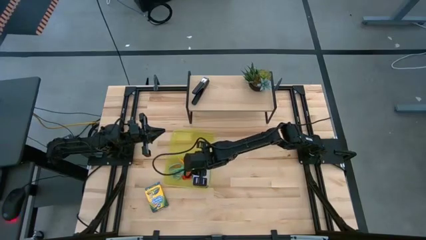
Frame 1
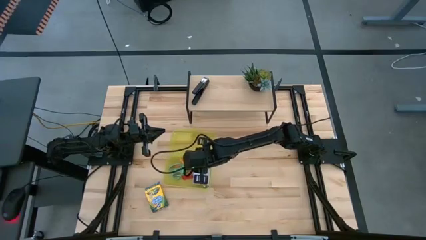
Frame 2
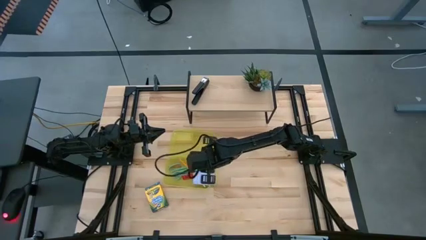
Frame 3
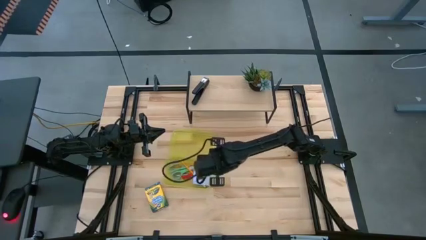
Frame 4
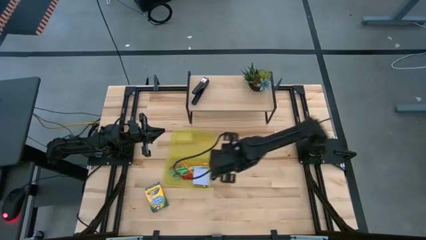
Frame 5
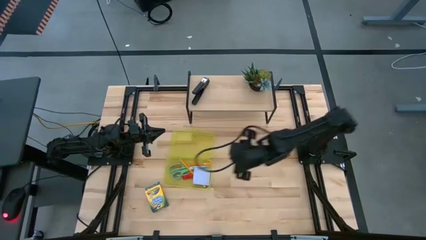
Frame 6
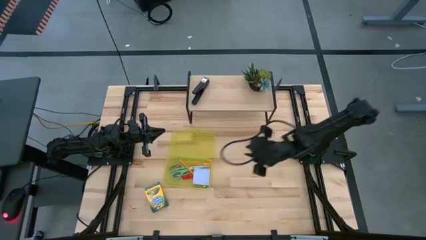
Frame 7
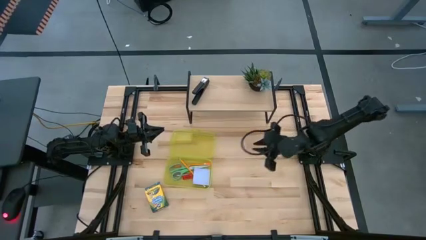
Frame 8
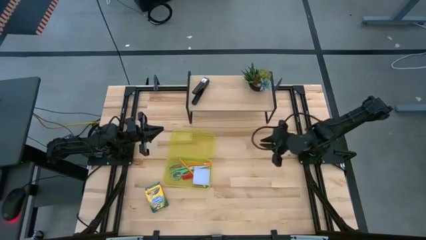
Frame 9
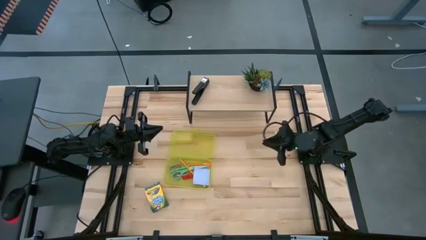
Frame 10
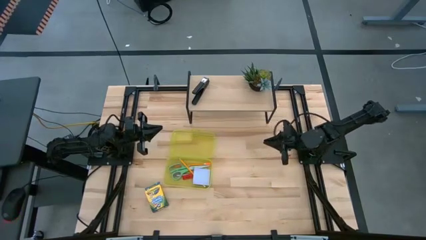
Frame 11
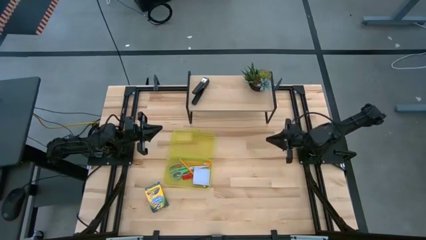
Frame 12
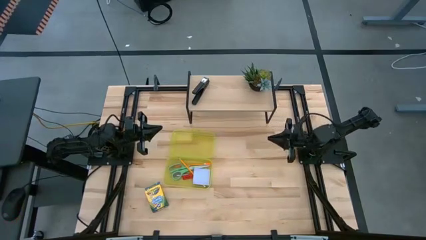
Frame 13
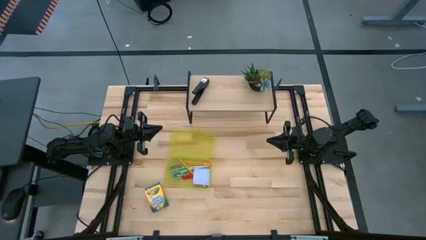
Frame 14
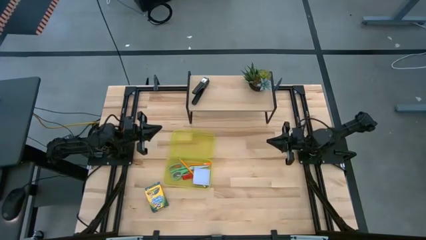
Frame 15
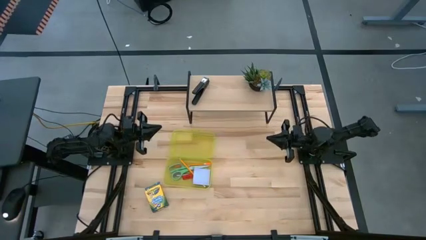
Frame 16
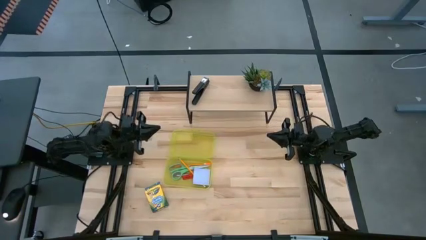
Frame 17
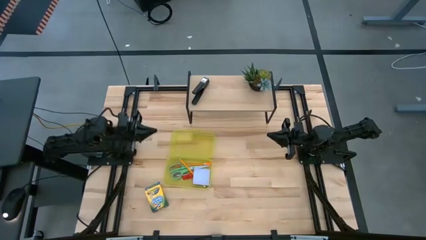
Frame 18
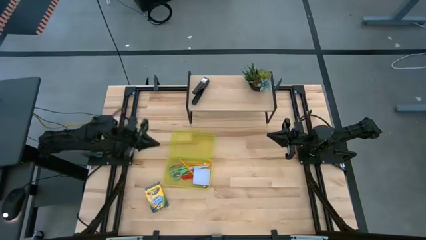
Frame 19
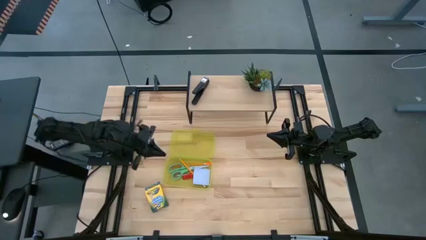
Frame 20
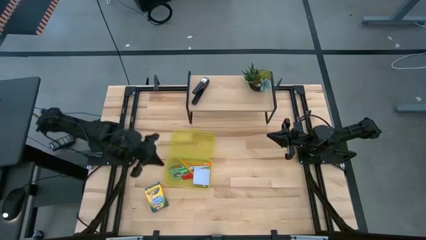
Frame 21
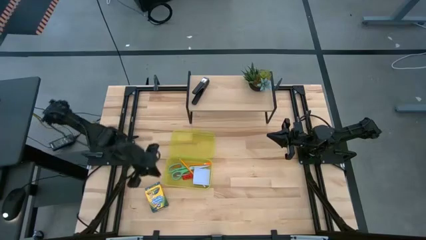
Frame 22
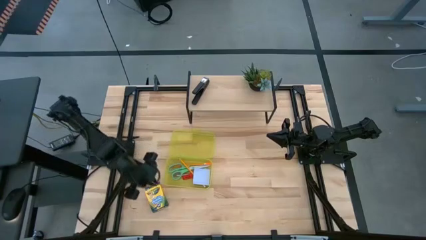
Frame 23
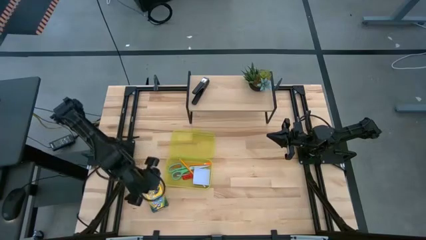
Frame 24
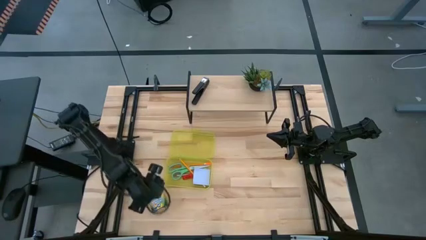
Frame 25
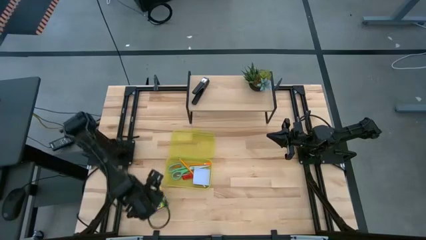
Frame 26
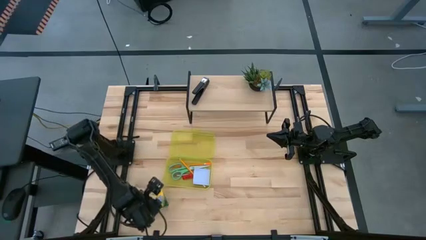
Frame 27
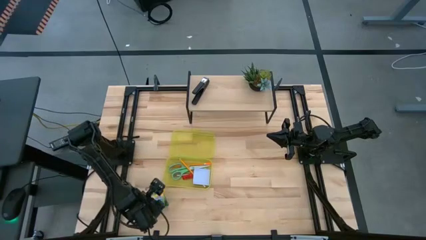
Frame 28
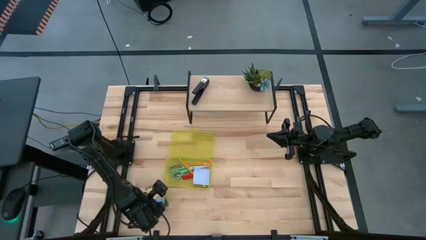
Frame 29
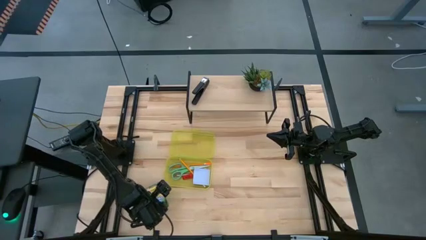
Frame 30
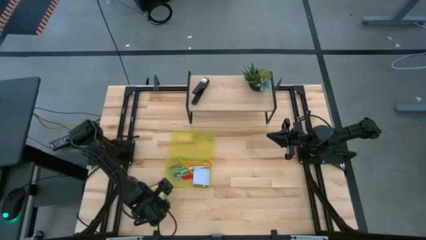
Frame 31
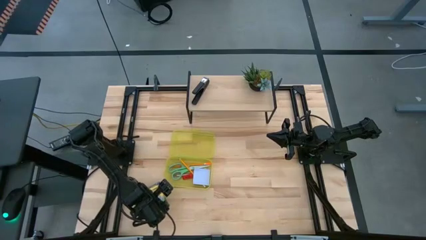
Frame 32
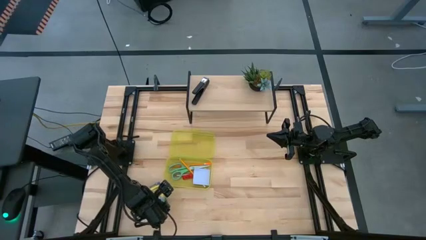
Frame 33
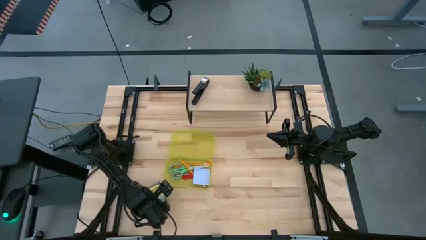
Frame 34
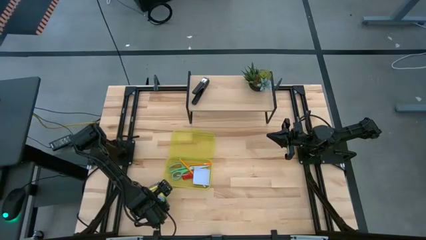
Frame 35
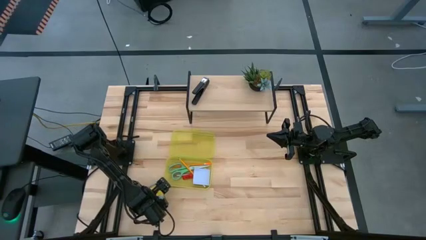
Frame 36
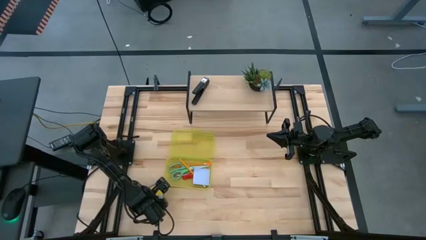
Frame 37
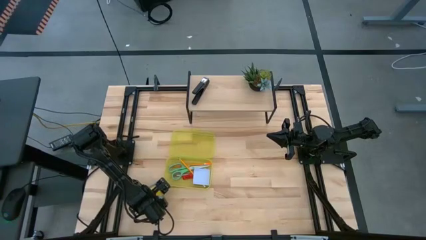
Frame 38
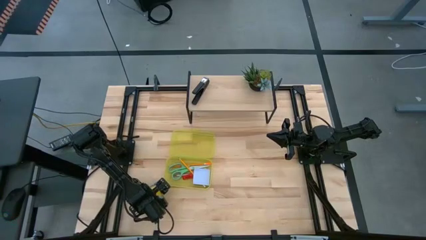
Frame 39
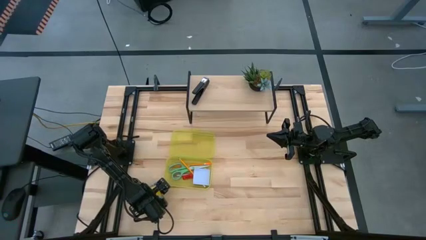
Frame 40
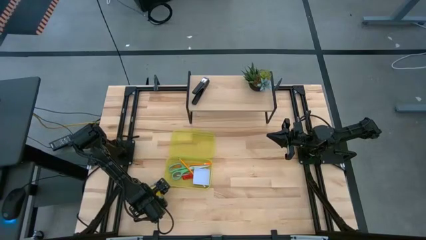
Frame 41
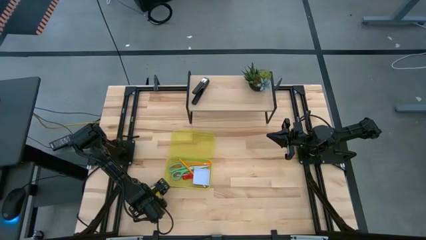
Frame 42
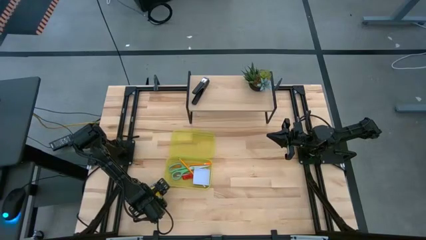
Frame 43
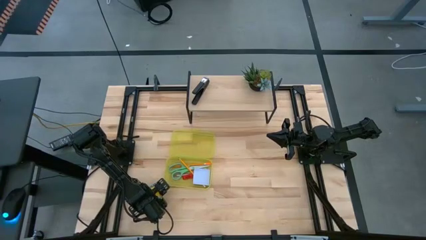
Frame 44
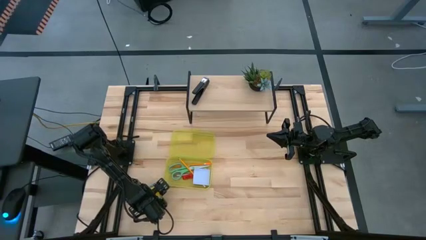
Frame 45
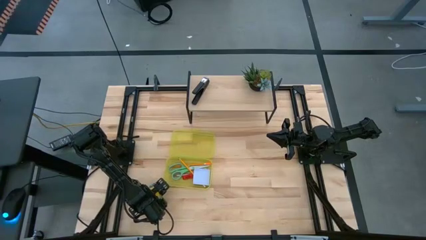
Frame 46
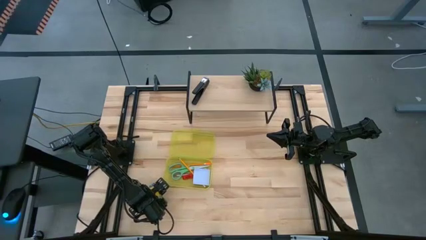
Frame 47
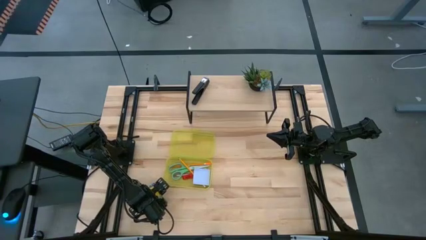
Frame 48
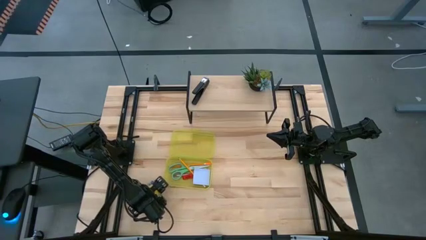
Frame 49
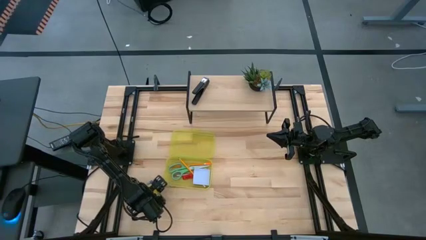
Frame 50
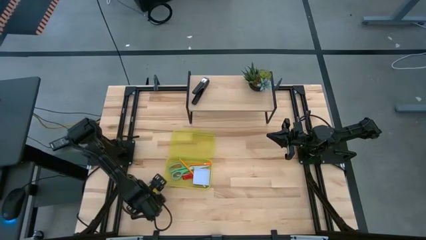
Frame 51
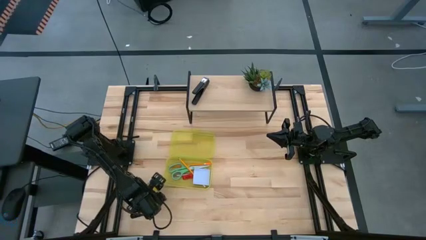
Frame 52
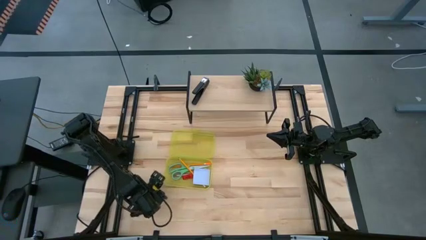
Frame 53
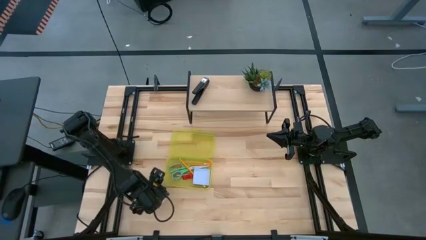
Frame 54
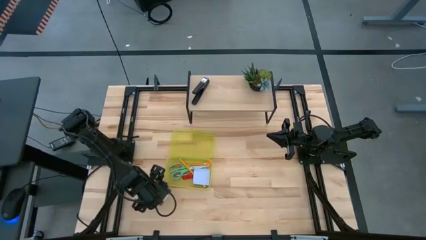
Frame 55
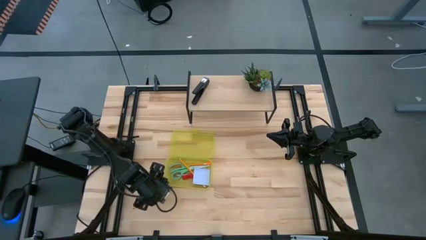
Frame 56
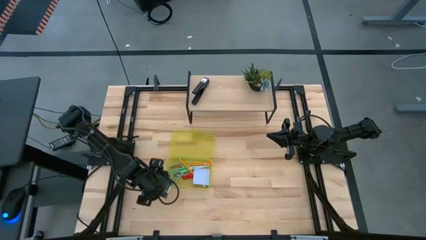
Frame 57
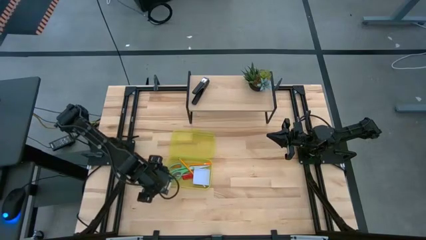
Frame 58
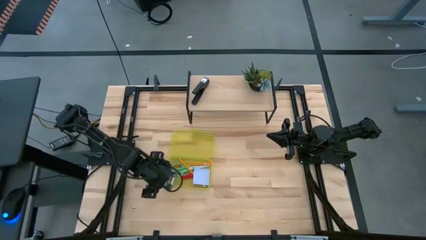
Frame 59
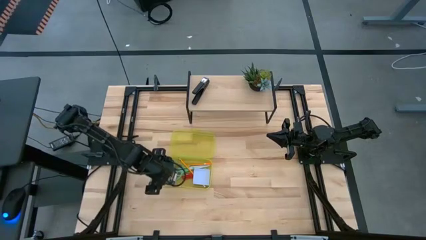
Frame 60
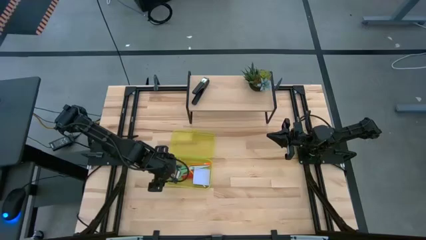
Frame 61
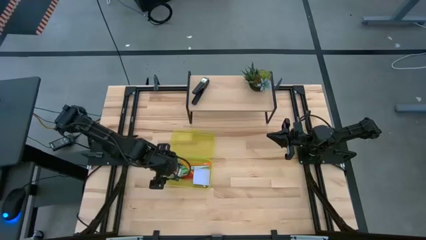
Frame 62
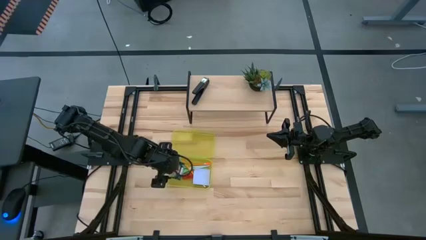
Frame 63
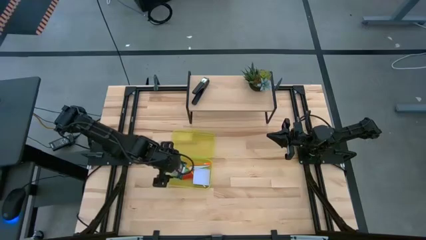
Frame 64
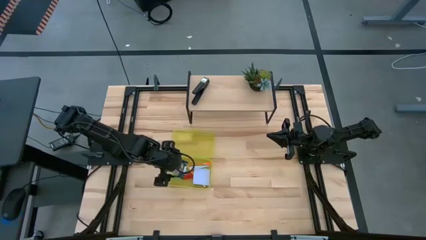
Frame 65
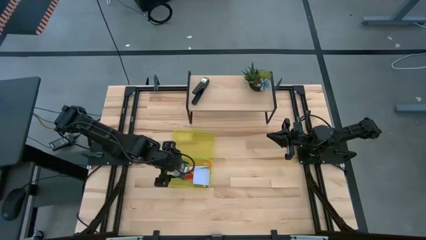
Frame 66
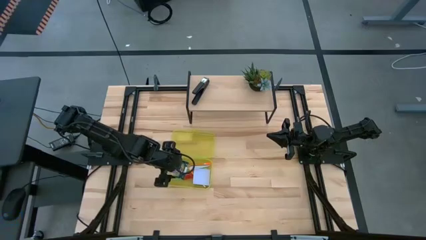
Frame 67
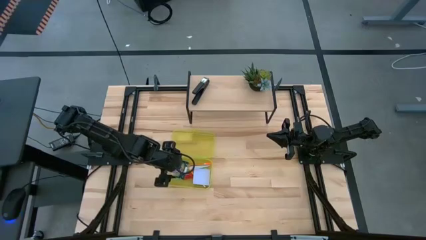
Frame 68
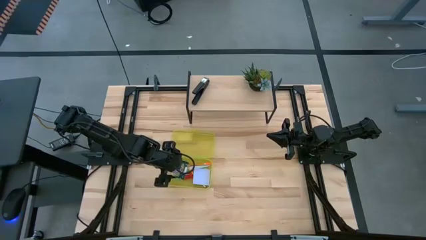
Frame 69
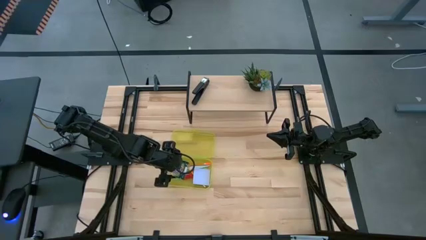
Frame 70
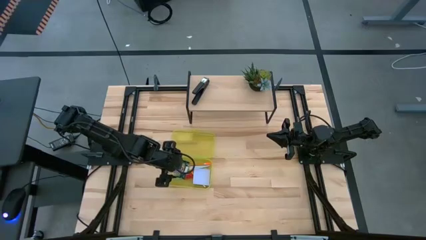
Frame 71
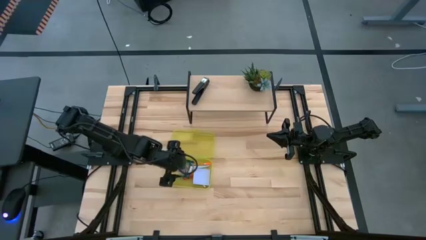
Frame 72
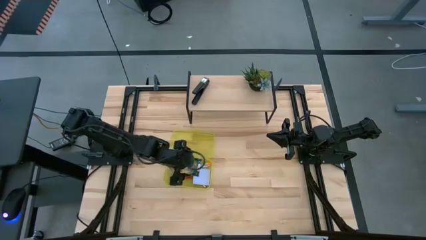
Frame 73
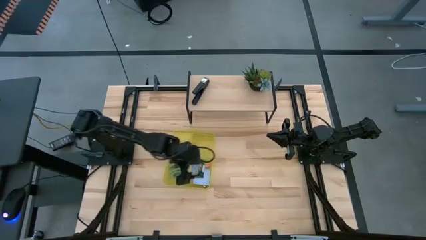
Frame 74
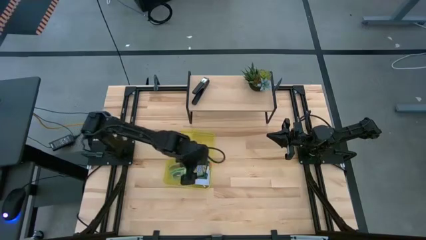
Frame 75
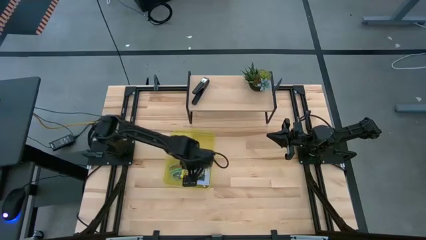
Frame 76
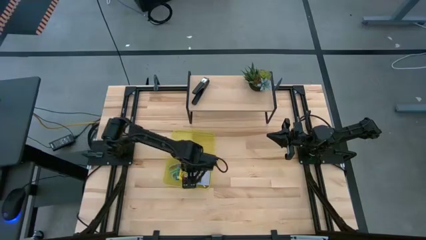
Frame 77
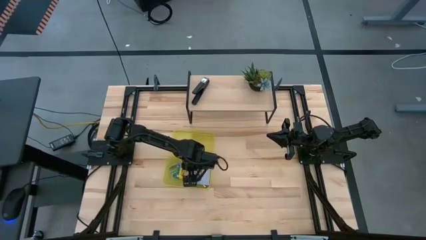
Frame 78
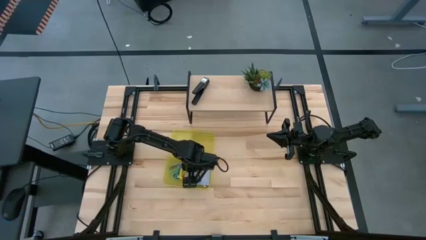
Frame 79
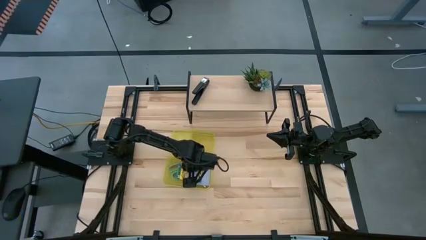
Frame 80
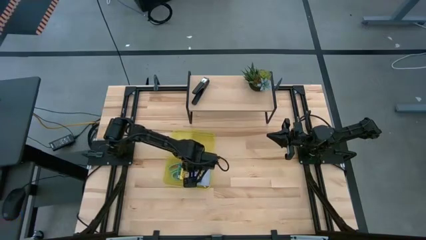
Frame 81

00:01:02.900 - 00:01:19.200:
Task: Pack school essentials
Put the crayon box into the supply box
